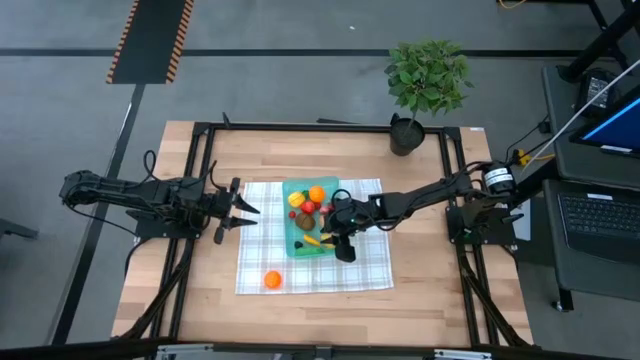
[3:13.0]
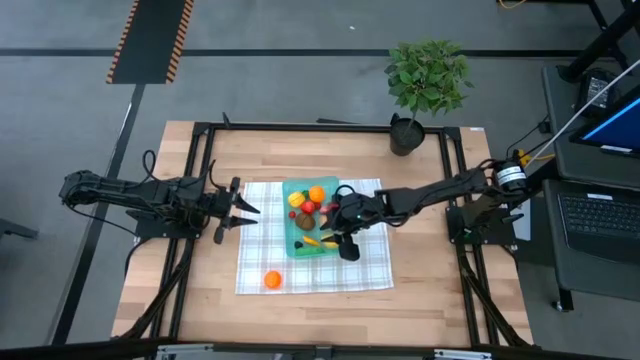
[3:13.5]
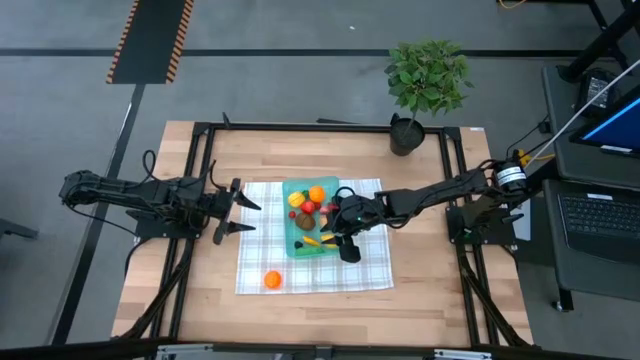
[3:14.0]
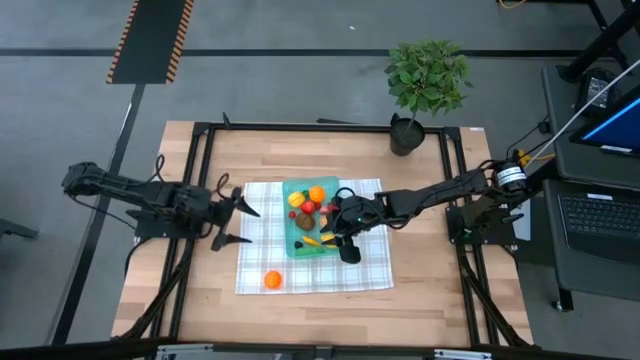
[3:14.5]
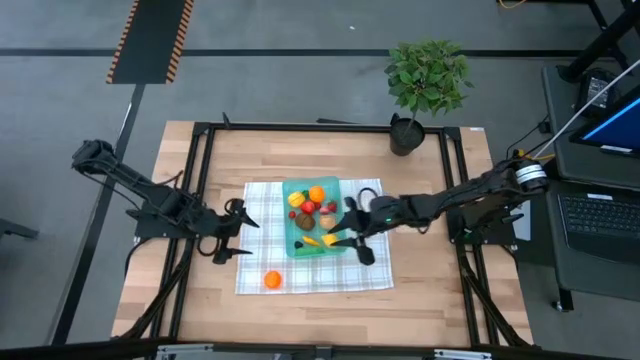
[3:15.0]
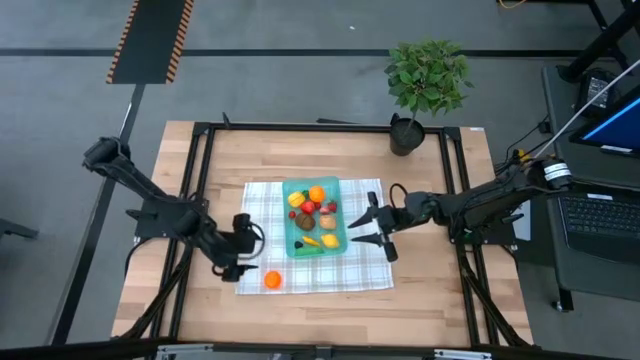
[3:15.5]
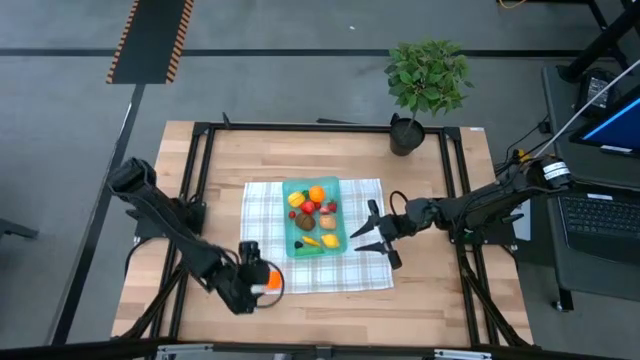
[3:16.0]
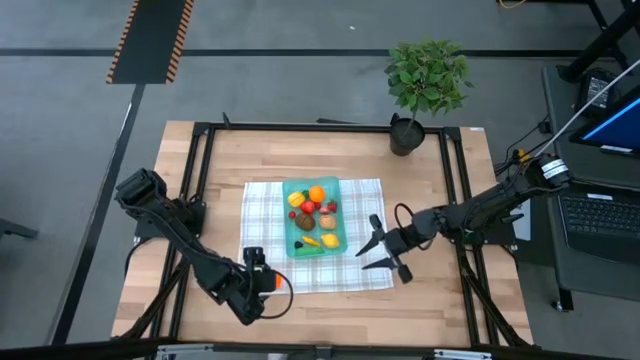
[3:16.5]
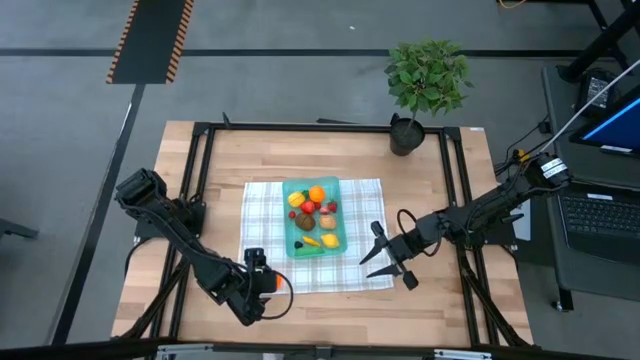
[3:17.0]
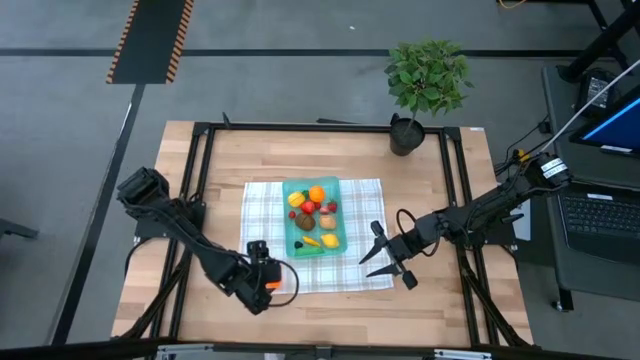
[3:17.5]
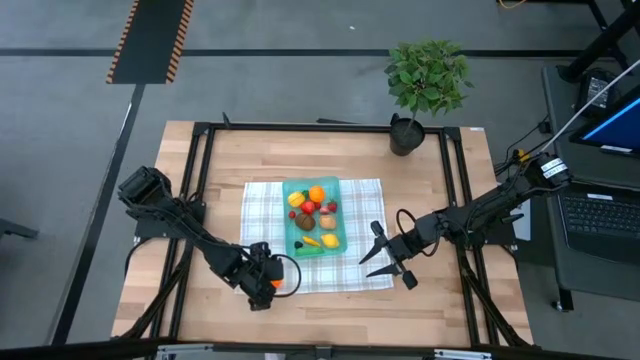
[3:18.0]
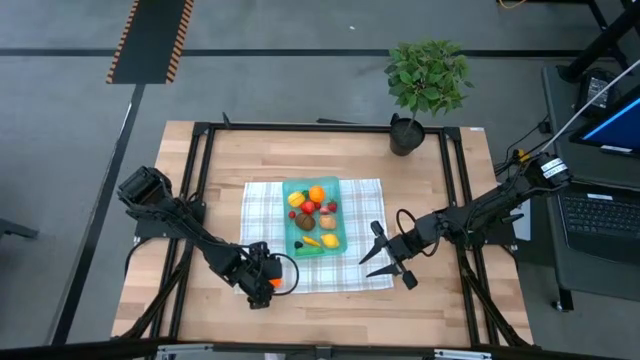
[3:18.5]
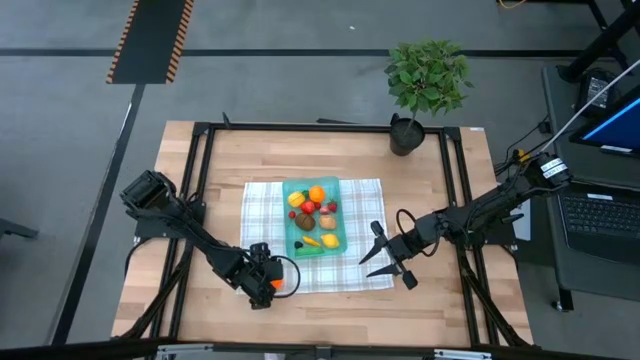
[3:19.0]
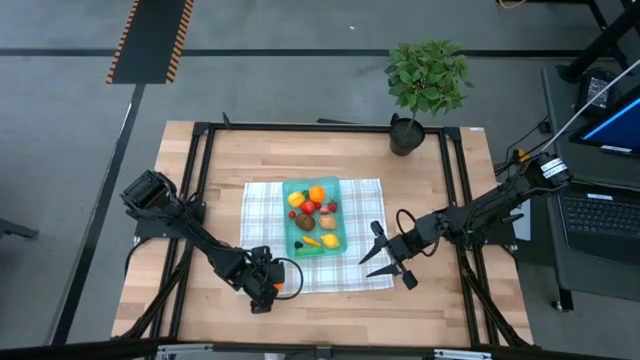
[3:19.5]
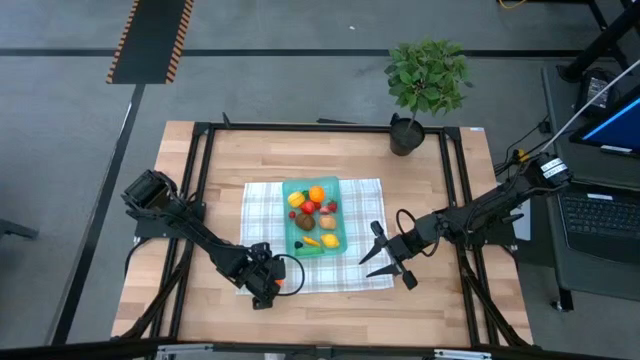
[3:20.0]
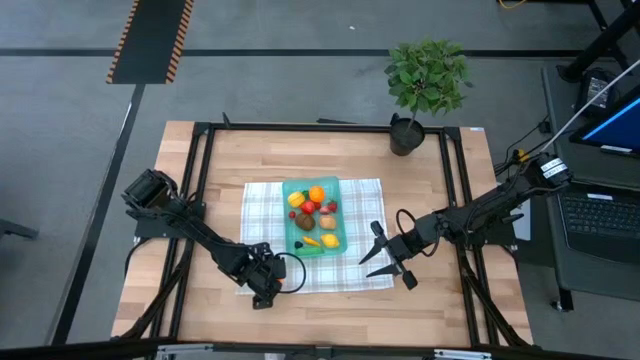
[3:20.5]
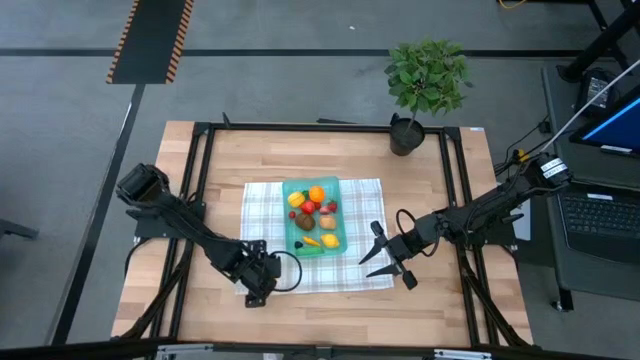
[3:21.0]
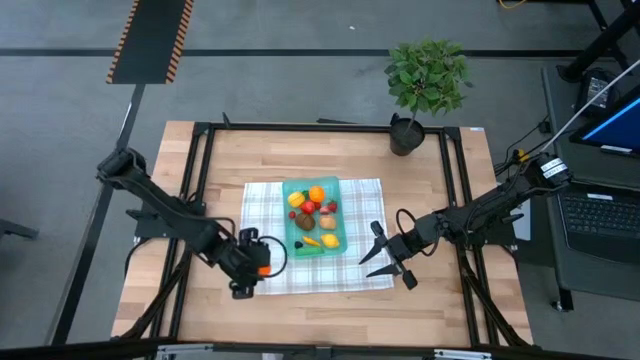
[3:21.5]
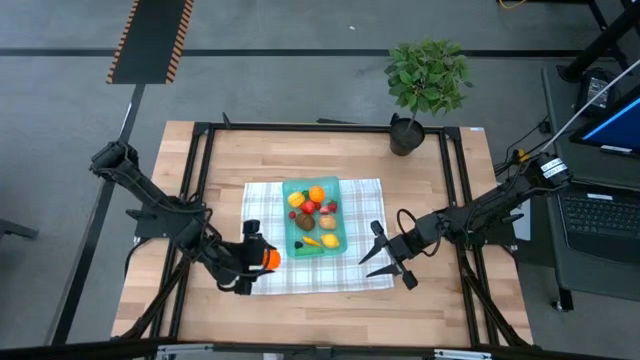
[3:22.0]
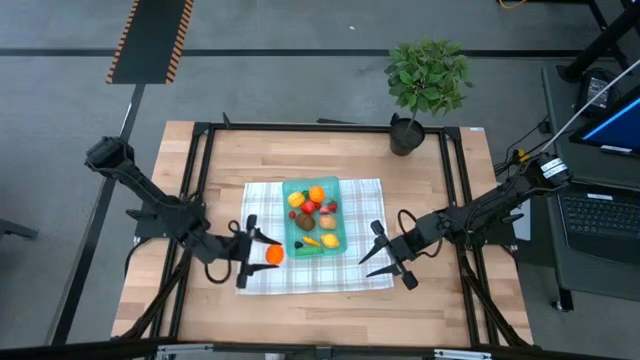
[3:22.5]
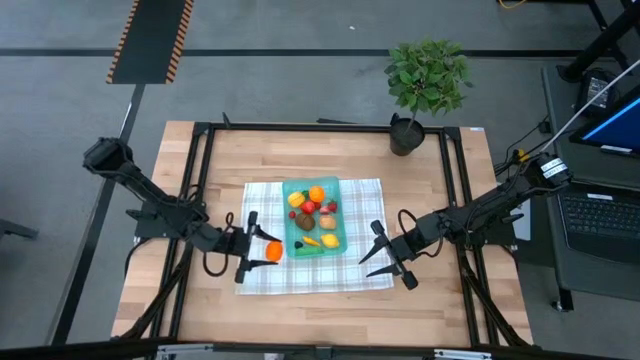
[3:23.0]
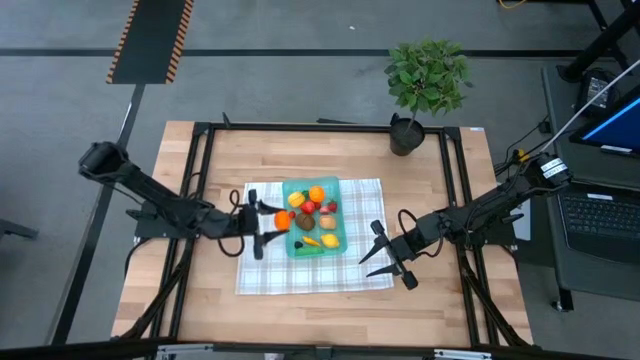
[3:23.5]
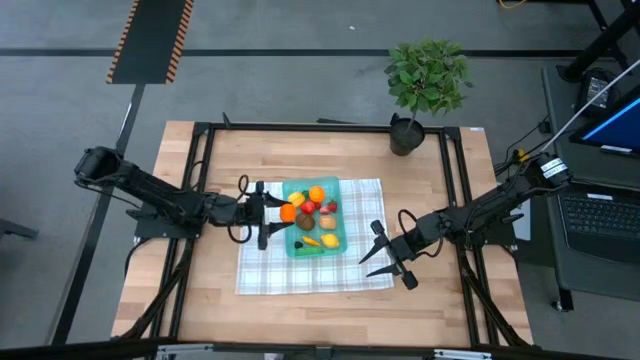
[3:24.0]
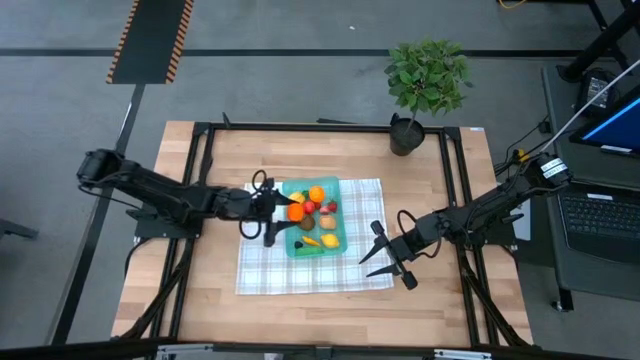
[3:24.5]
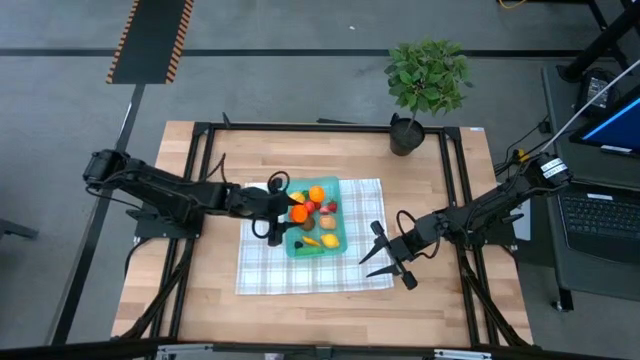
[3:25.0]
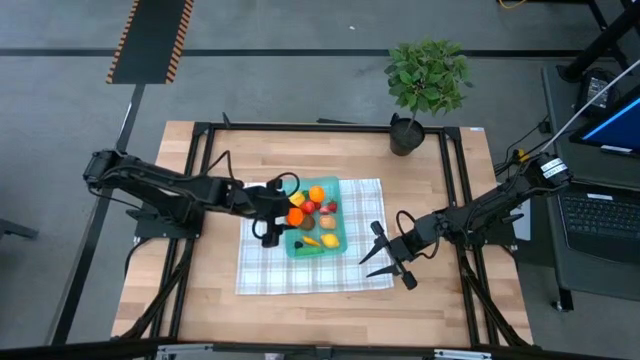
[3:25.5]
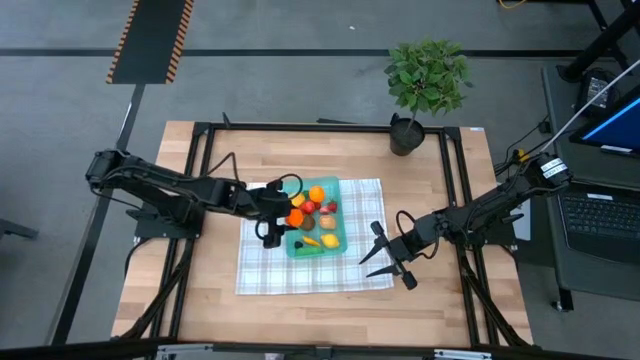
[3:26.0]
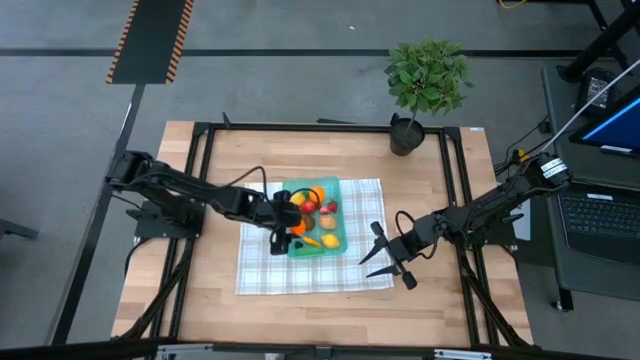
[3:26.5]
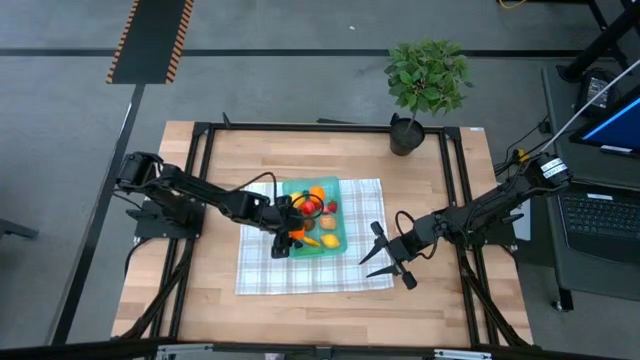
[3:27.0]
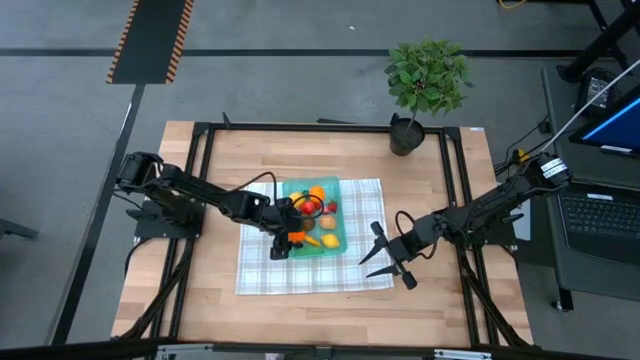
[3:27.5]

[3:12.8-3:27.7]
Task: Pick and placing Produce into tupperware
Put the pumpkin into the blue bin

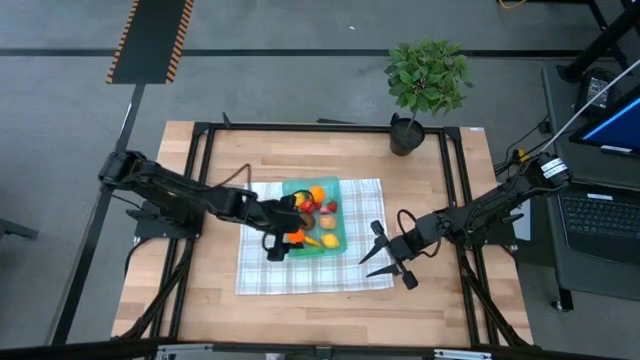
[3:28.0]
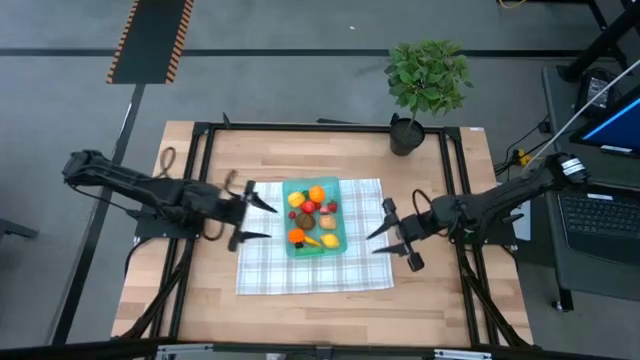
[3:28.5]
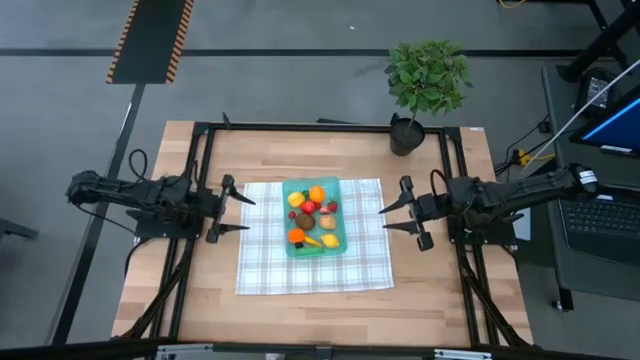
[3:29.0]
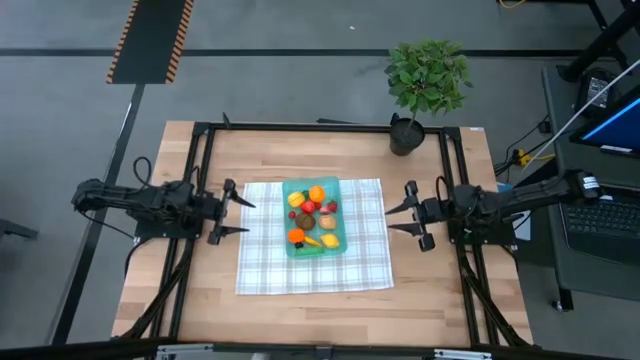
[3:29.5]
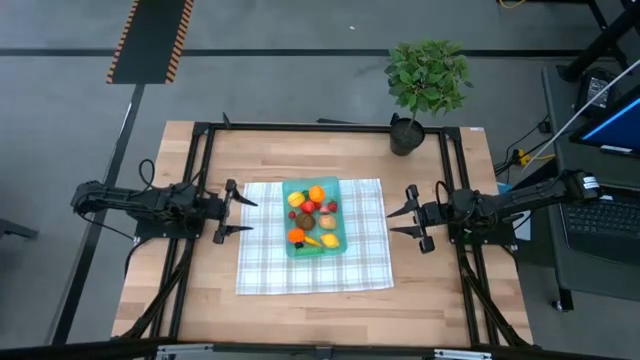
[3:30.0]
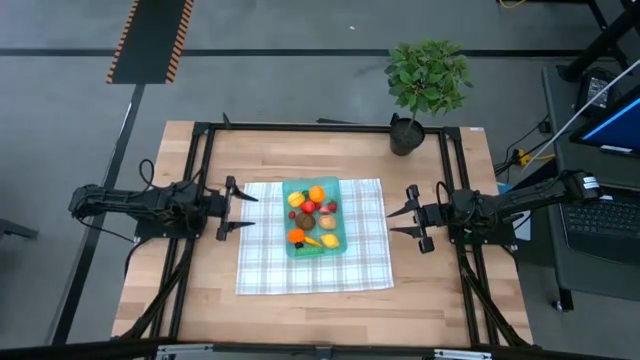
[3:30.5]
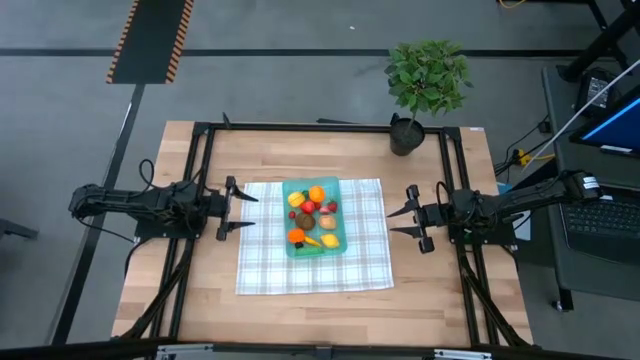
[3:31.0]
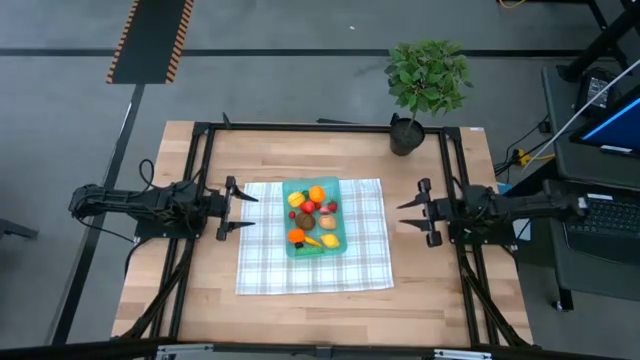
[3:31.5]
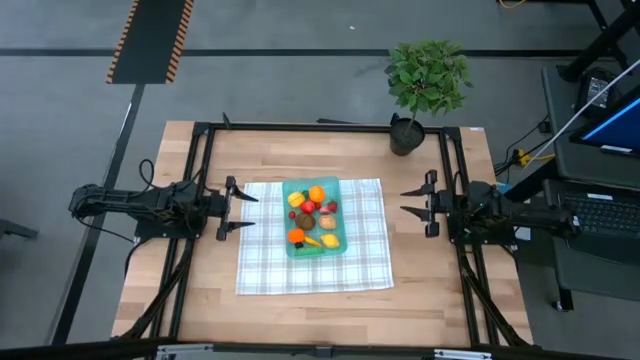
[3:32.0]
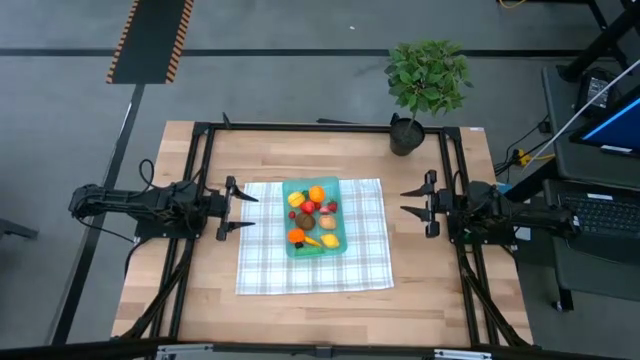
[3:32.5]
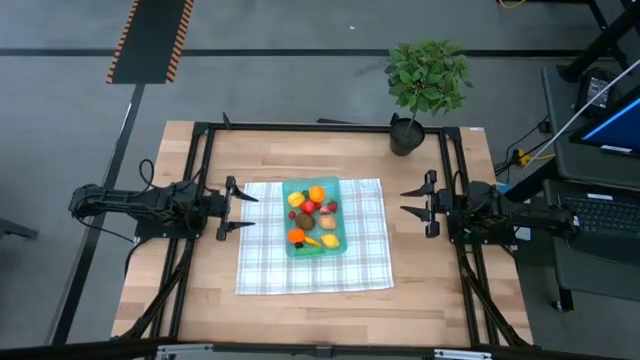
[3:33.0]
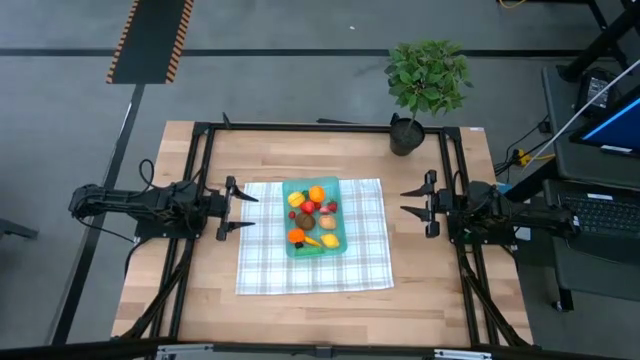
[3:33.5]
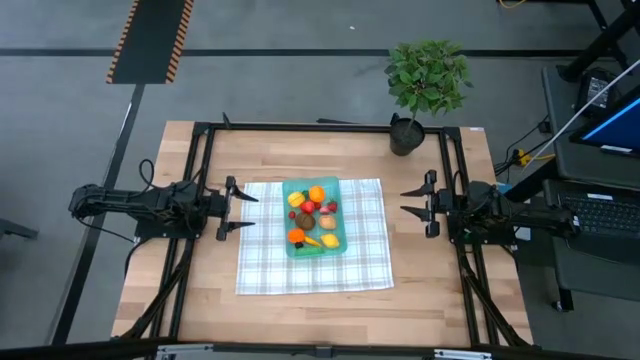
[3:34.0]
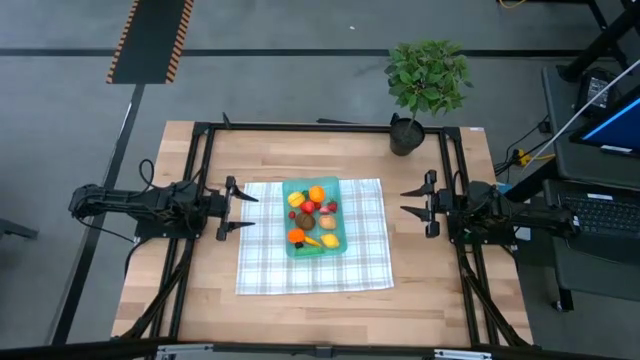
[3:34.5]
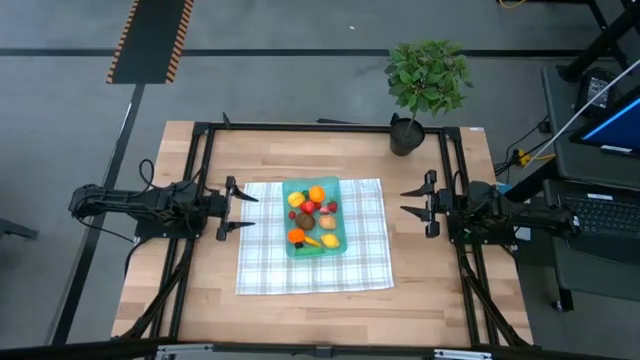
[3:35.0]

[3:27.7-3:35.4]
Return to Home Position
